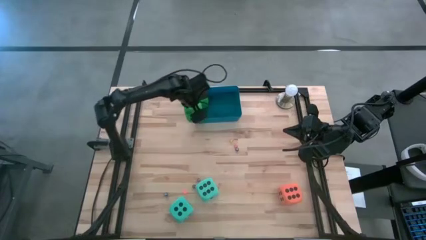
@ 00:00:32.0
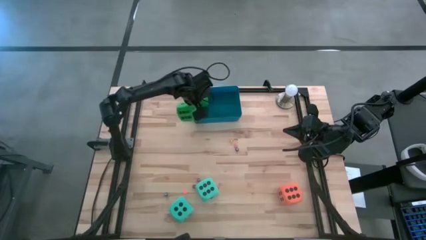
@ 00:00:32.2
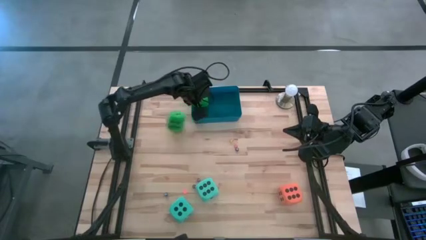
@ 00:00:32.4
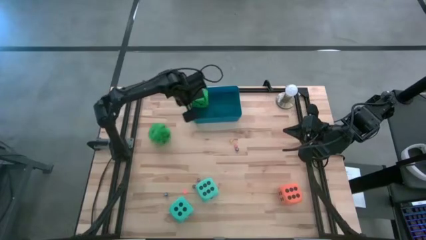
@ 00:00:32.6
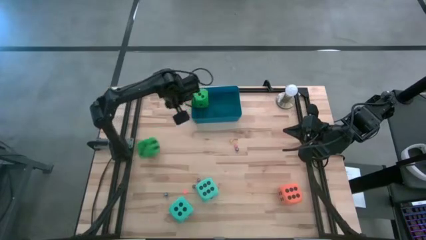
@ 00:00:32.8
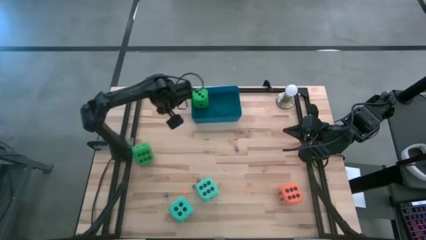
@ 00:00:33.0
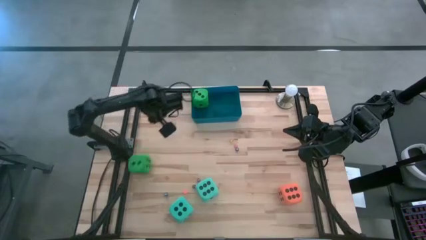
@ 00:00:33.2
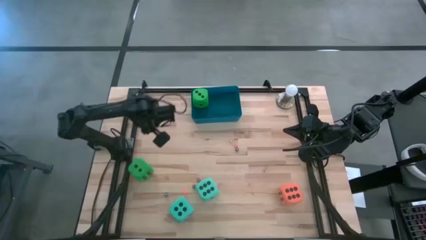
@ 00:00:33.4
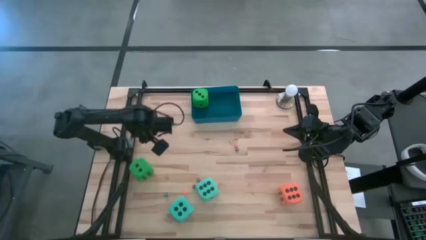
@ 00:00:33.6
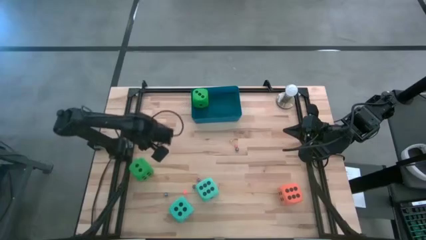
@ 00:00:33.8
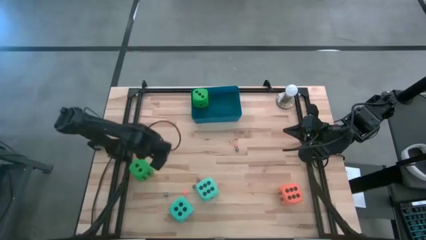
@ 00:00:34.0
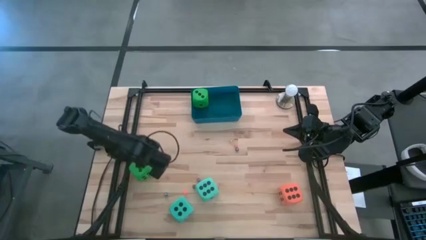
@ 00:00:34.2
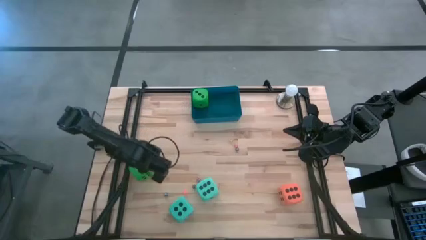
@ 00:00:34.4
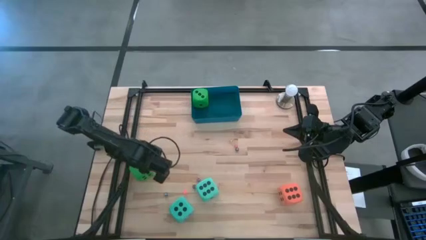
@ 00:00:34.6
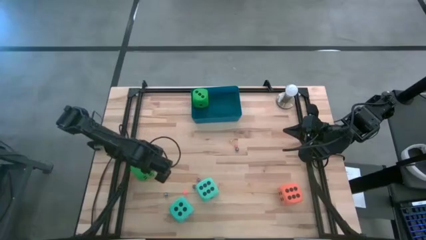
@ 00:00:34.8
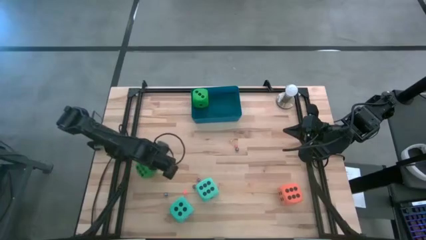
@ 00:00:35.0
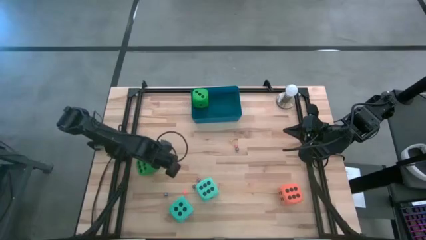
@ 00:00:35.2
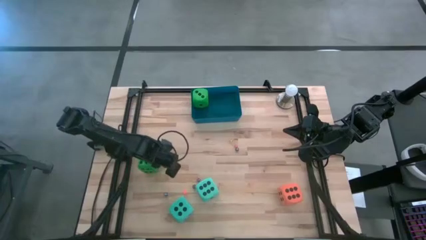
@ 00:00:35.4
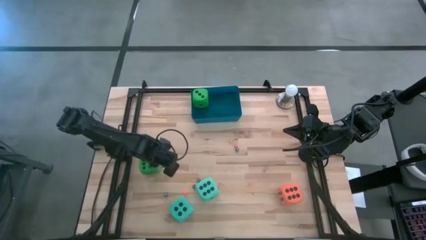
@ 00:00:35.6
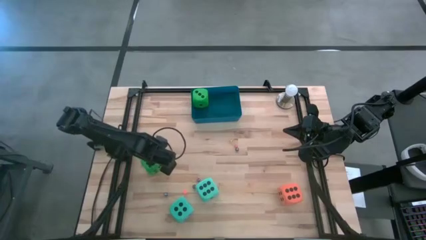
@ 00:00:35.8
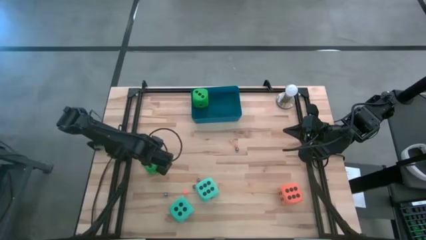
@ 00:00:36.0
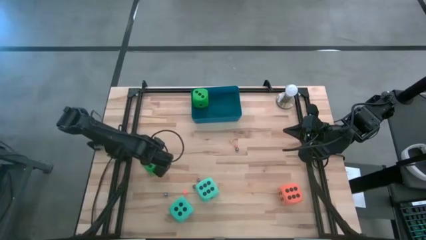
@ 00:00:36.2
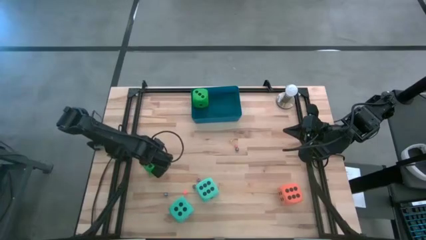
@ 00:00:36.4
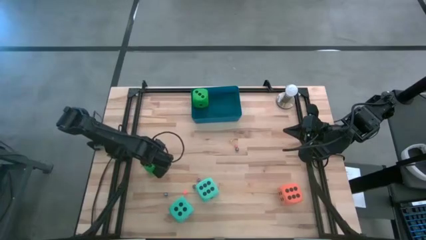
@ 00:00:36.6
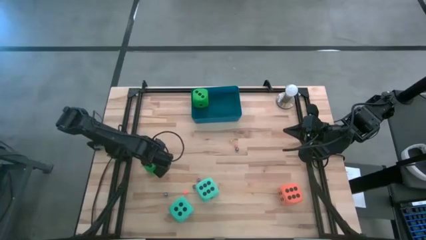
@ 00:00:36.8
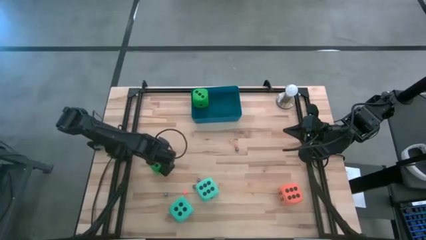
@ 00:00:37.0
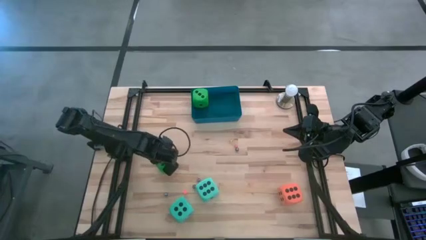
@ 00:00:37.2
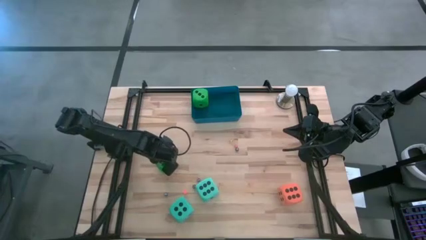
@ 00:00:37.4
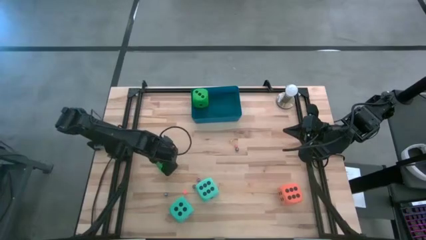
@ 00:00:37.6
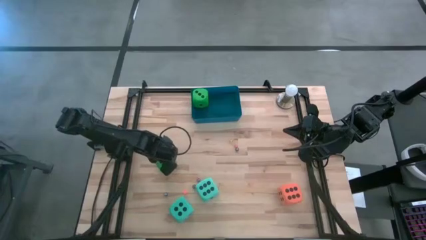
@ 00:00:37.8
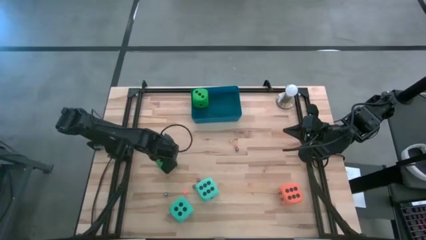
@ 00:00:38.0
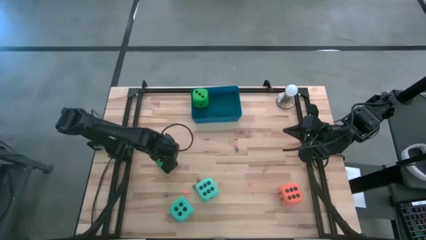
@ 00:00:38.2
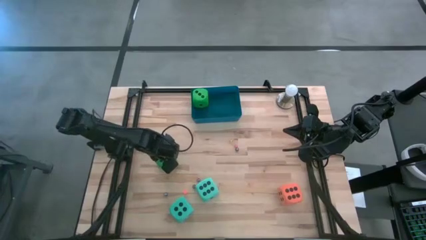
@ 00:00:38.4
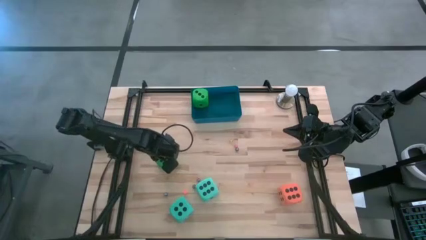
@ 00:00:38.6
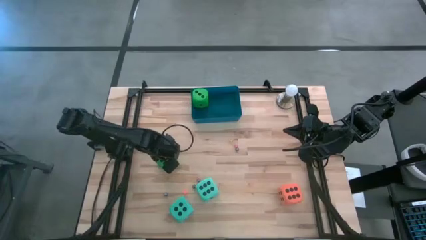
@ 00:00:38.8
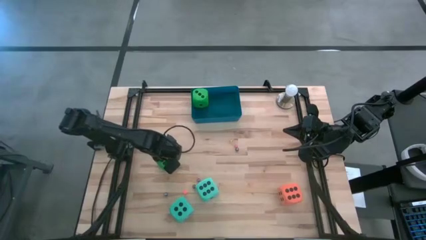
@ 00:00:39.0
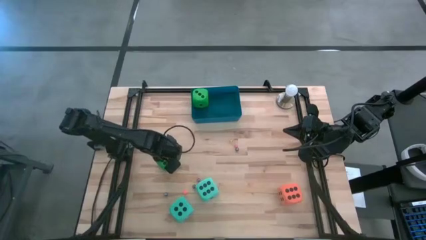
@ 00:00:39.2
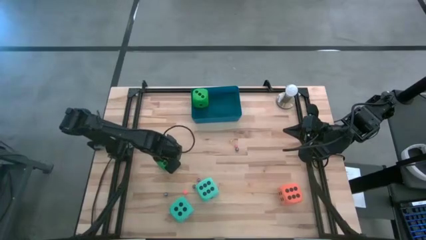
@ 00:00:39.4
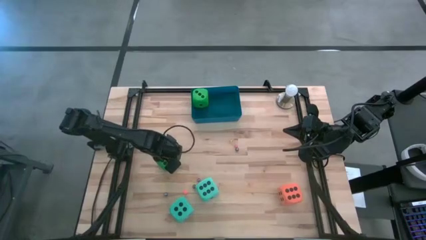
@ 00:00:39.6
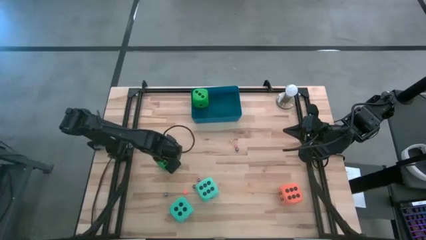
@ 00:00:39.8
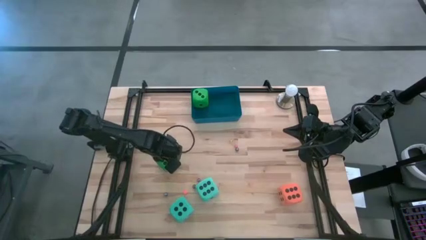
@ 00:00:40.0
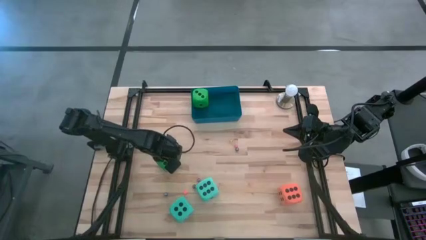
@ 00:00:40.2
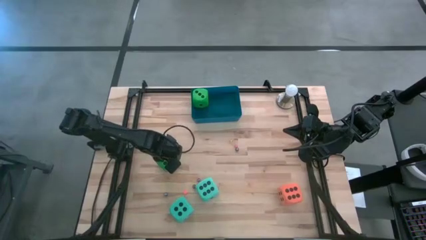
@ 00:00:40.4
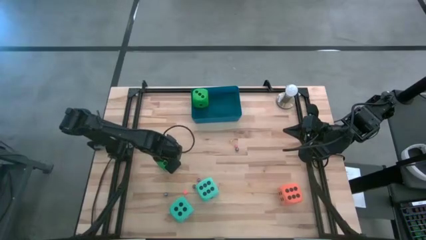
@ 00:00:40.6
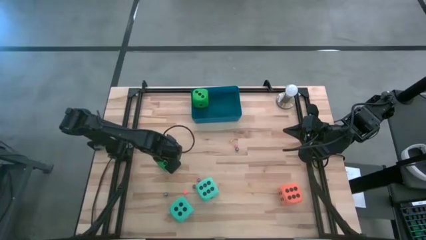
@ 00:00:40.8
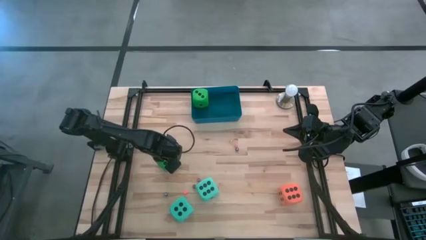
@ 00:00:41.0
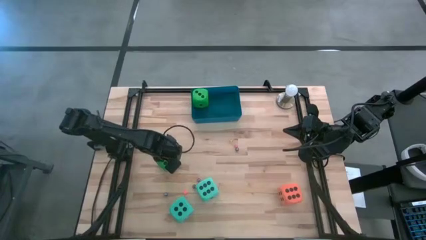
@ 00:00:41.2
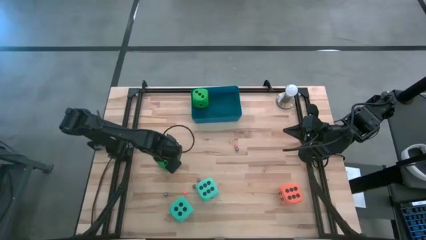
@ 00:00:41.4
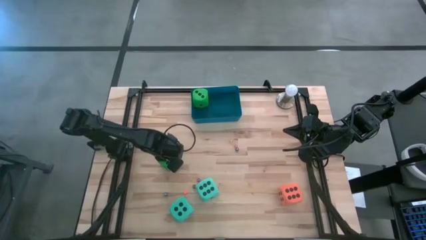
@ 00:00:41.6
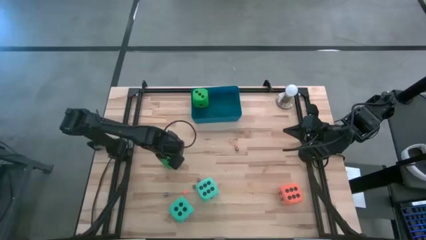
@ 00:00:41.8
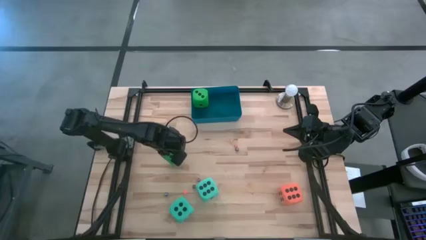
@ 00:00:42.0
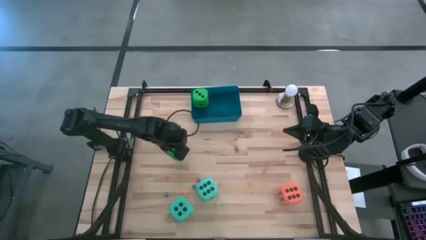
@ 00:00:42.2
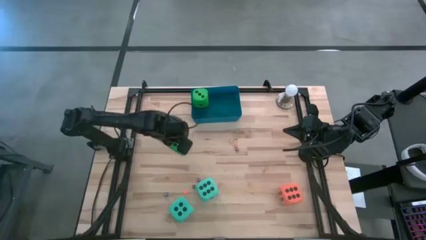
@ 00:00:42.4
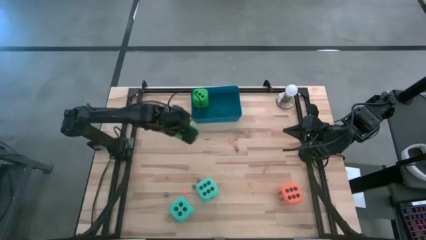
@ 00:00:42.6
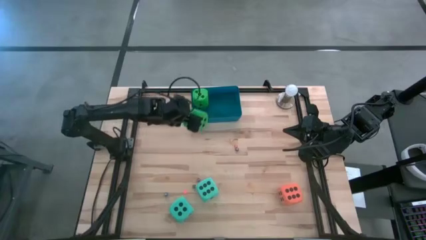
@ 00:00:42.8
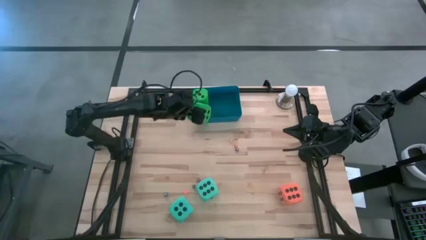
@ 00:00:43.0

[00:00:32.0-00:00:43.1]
Task: Pick & Place Dice
Put the large green dice into the blue bin
